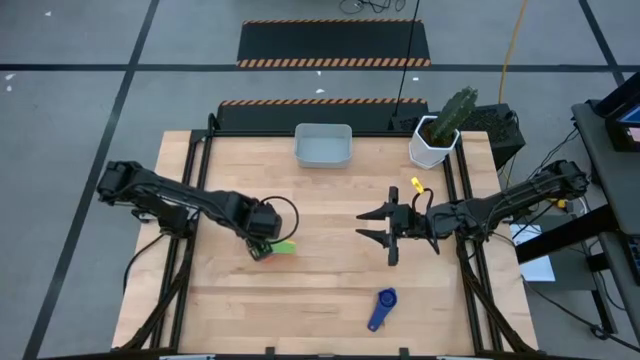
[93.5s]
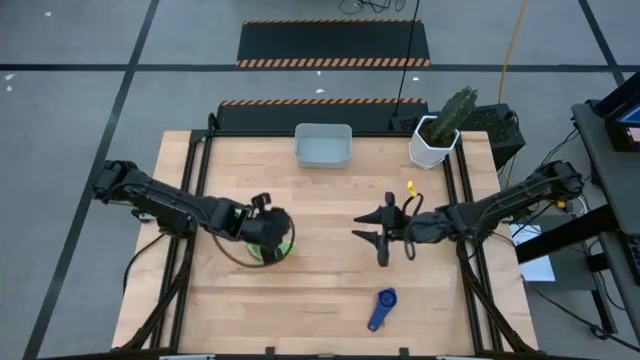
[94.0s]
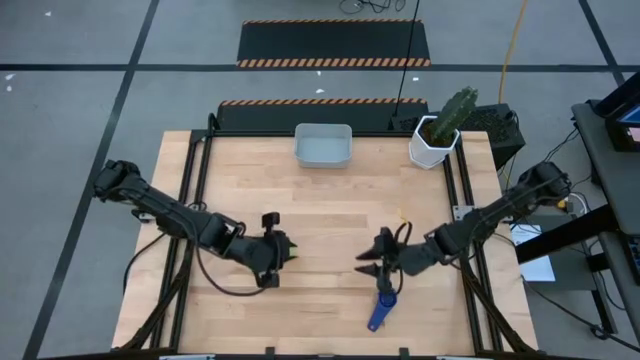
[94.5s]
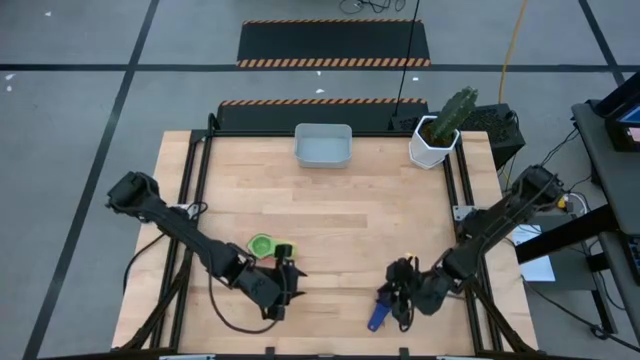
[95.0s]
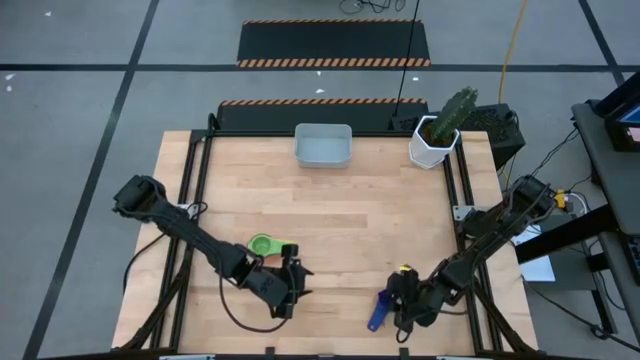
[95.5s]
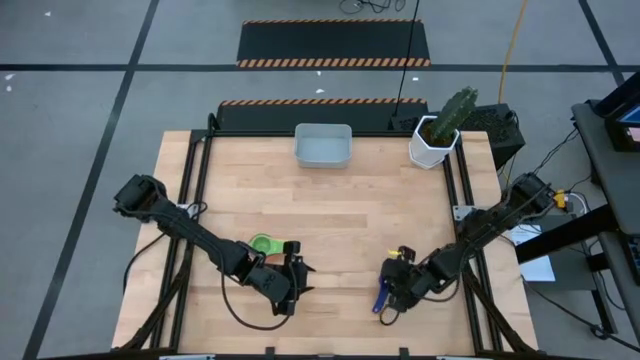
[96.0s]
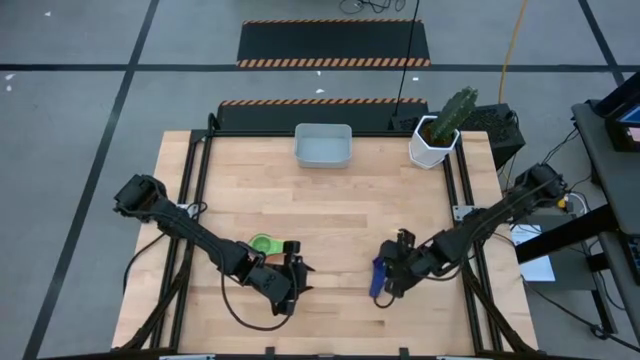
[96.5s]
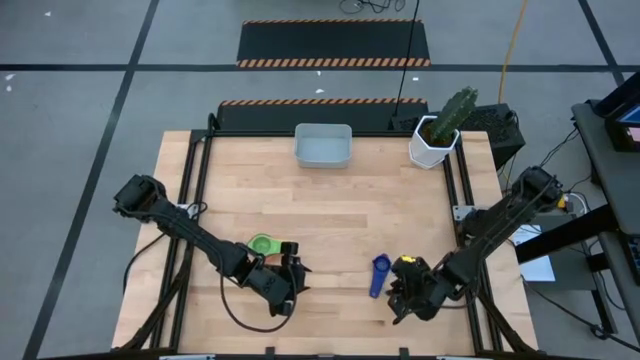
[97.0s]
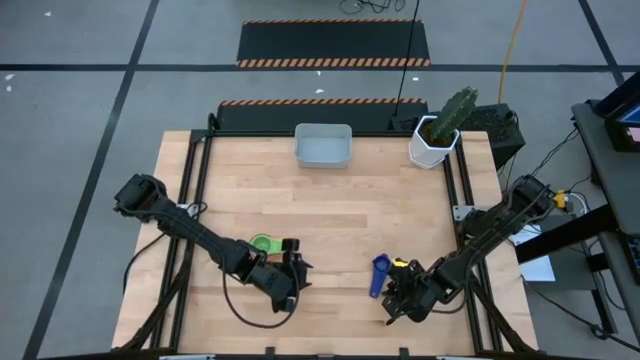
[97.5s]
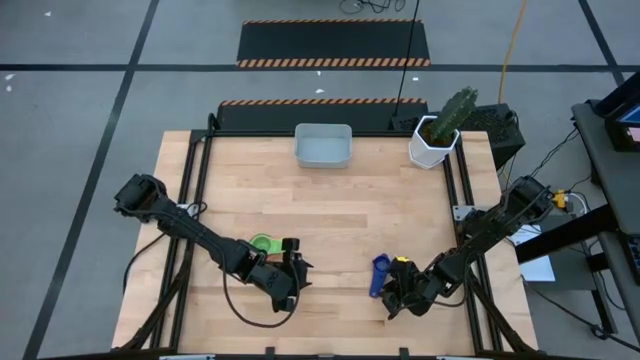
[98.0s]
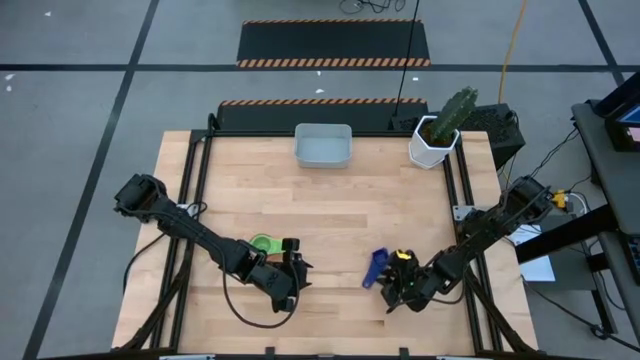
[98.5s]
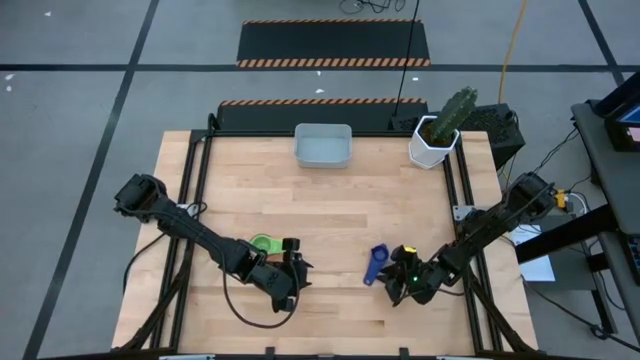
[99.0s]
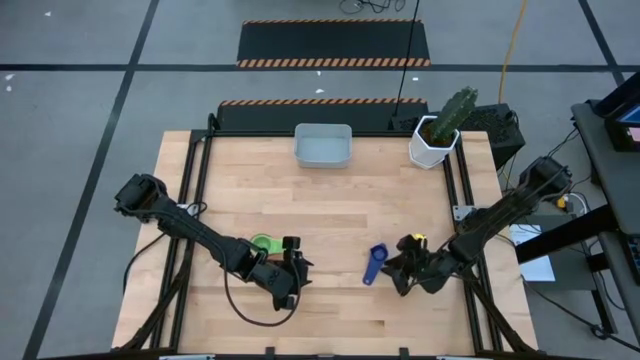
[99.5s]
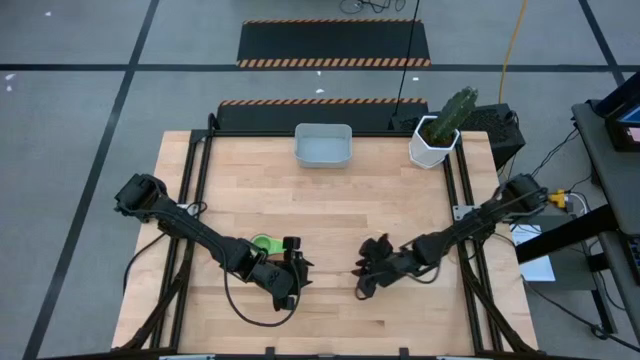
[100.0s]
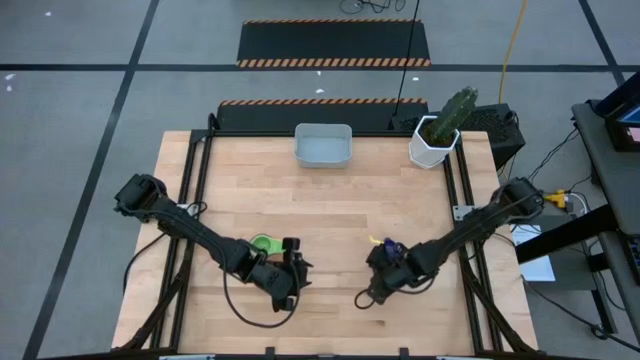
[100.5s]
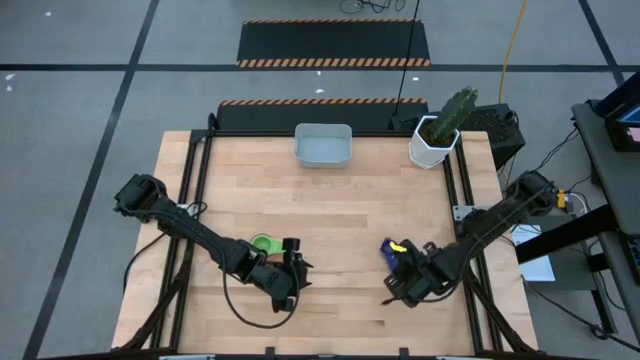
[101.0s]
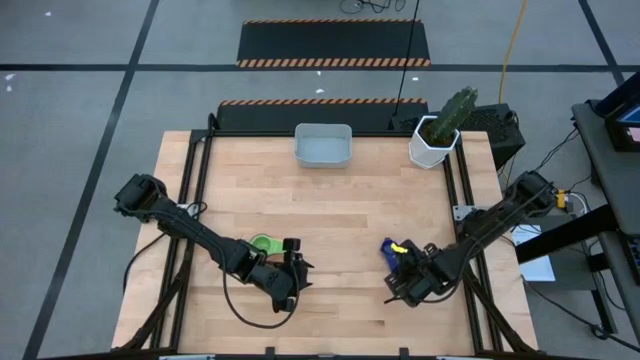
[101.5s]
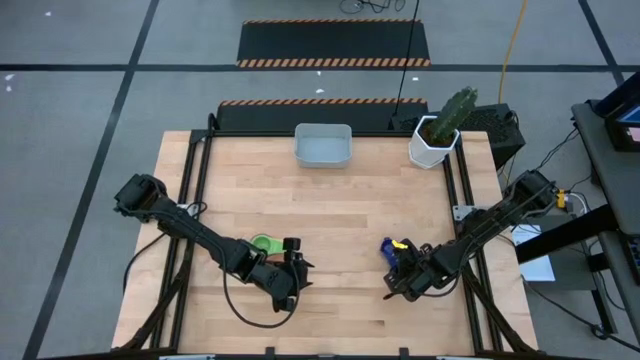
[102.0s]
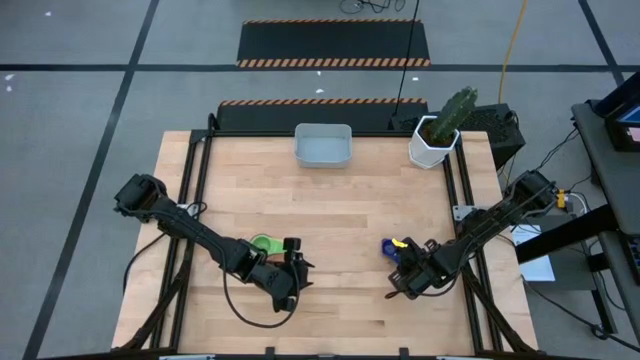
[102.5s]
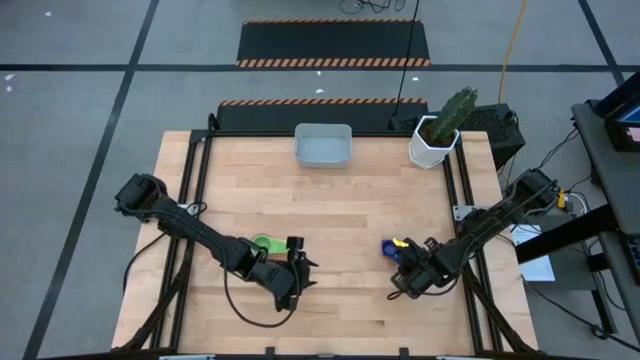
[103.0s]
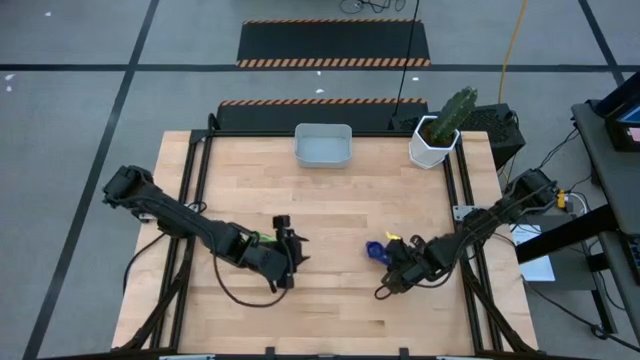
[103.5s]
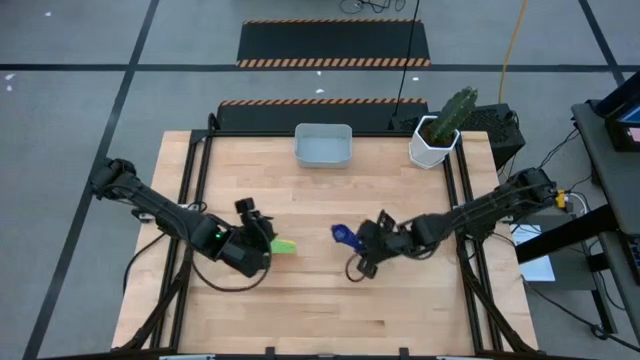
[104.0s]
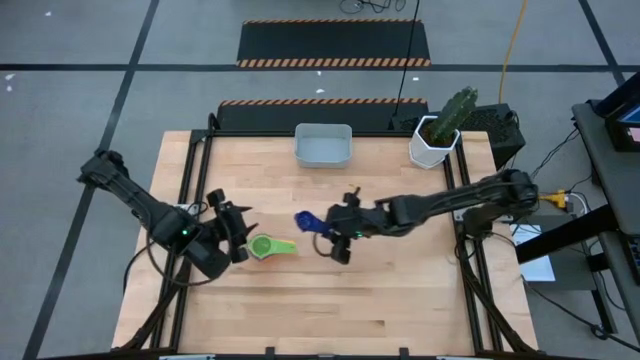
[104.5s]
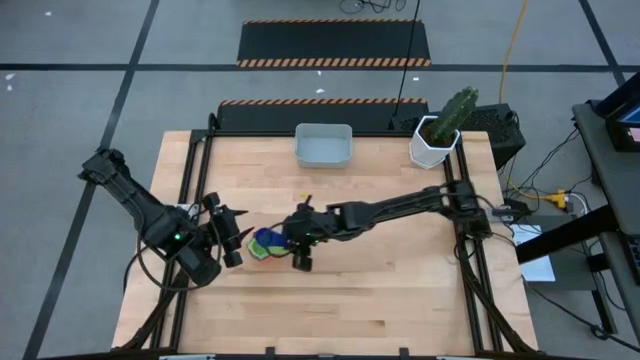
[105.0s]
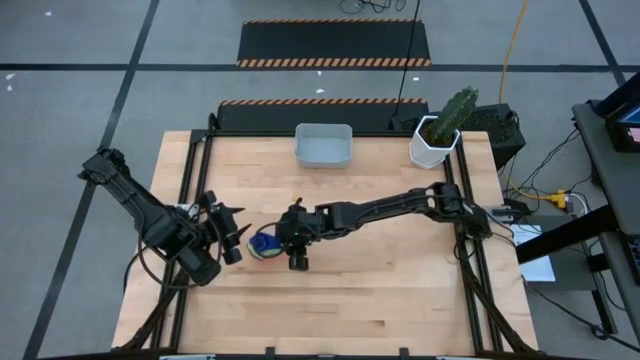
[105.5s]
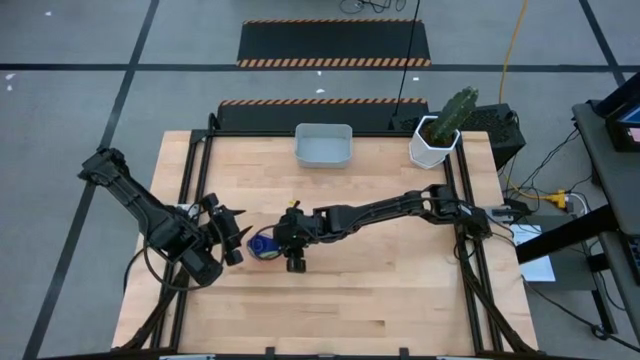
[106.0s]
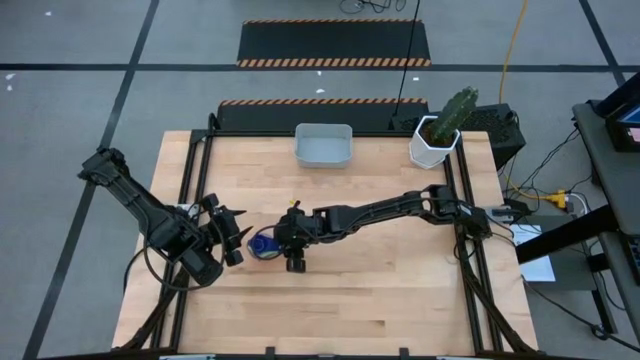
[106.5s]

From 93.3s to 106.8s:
Task: Nest measuring cups in basket
Stack the dark blue measuring cup into the green measuring cup

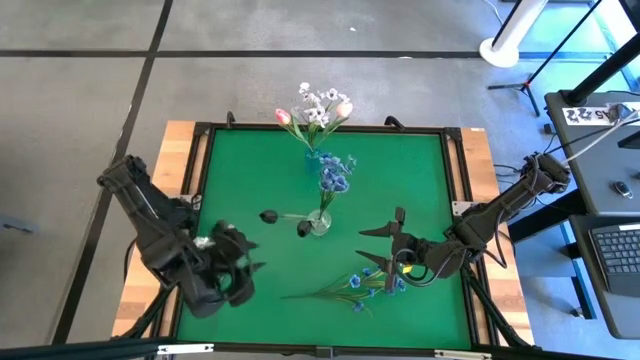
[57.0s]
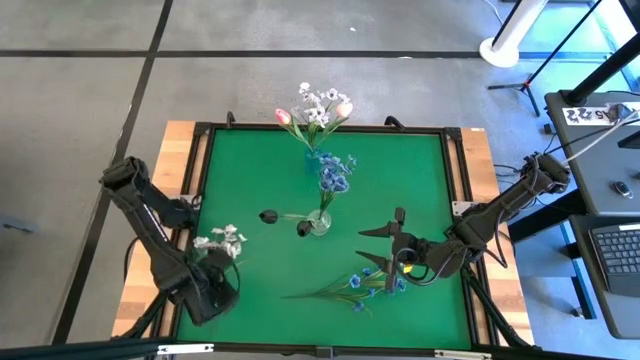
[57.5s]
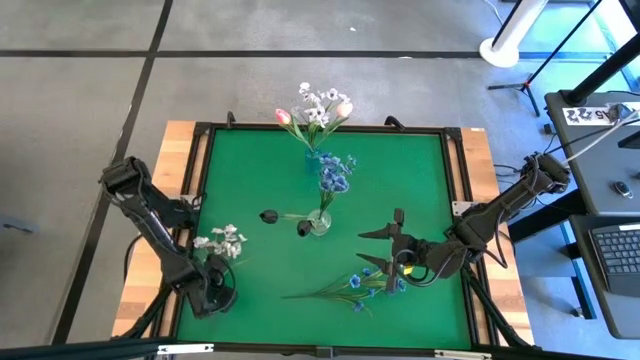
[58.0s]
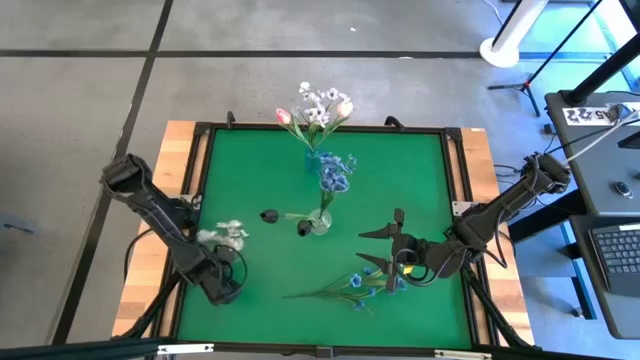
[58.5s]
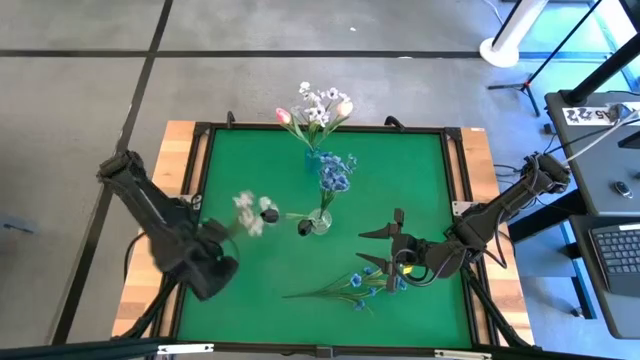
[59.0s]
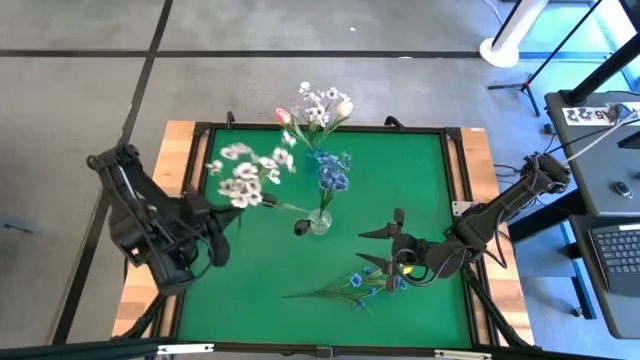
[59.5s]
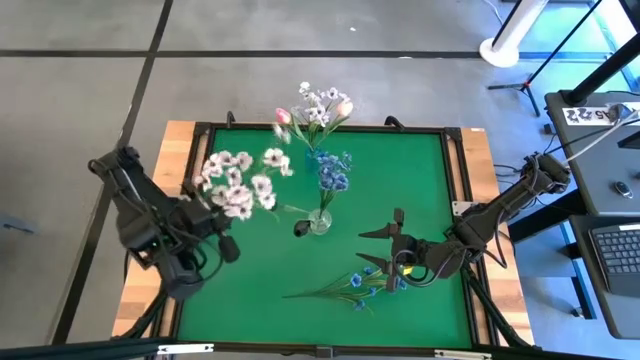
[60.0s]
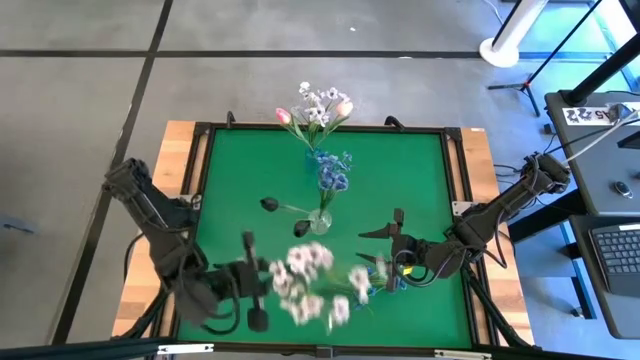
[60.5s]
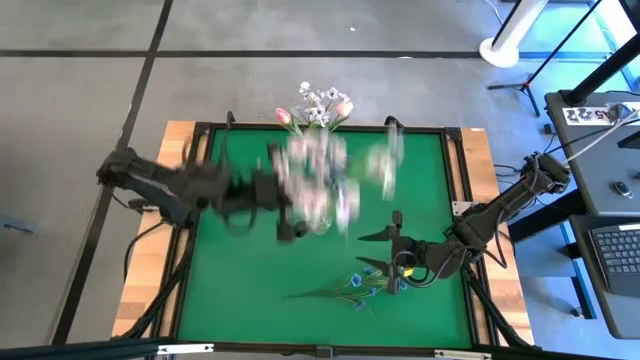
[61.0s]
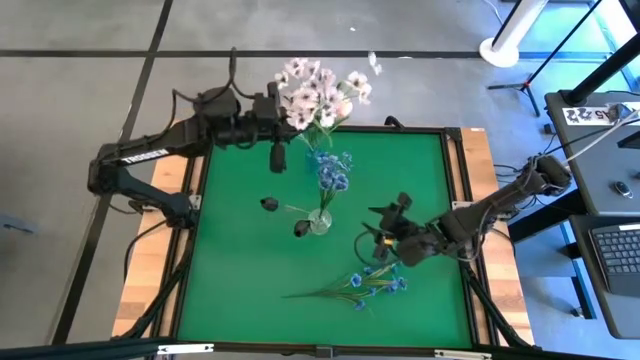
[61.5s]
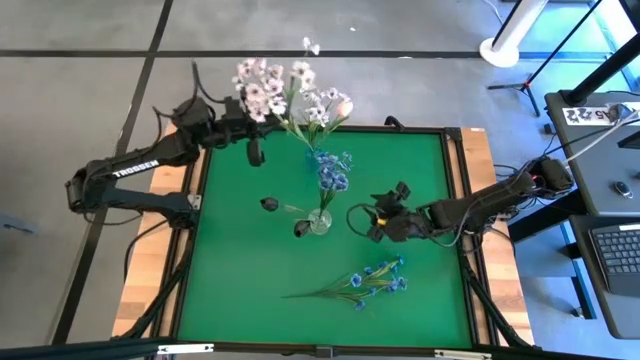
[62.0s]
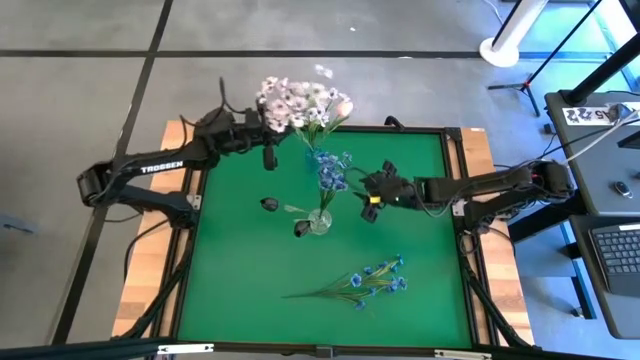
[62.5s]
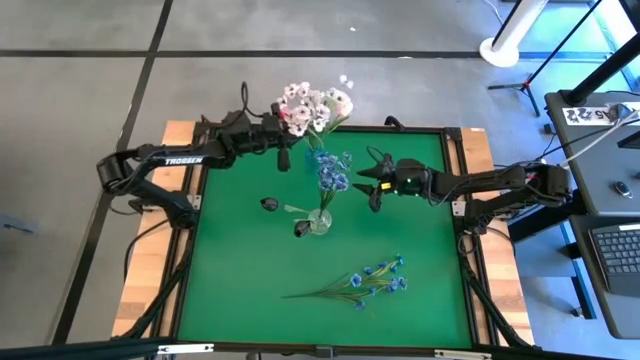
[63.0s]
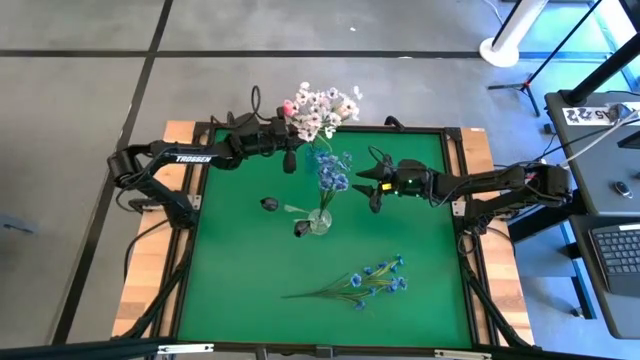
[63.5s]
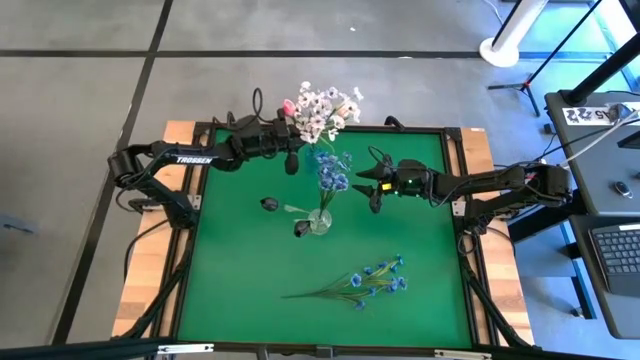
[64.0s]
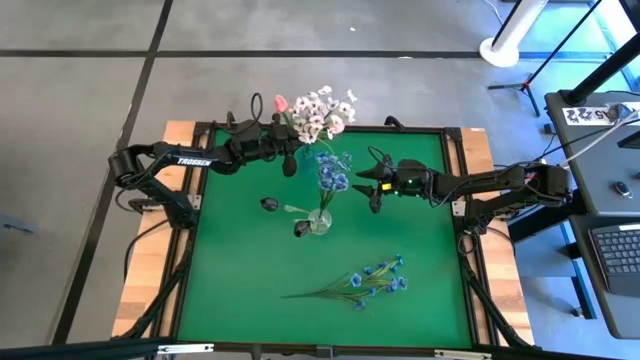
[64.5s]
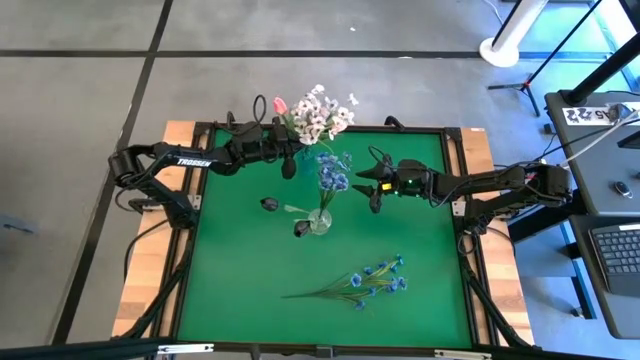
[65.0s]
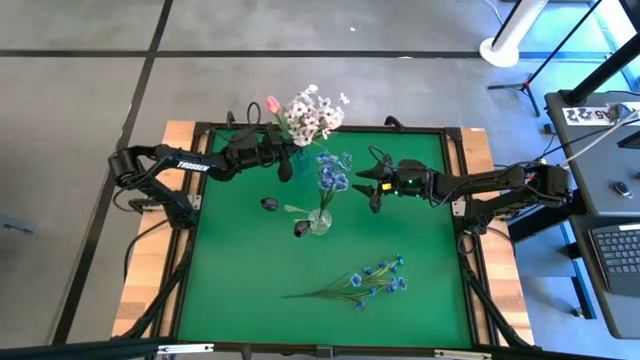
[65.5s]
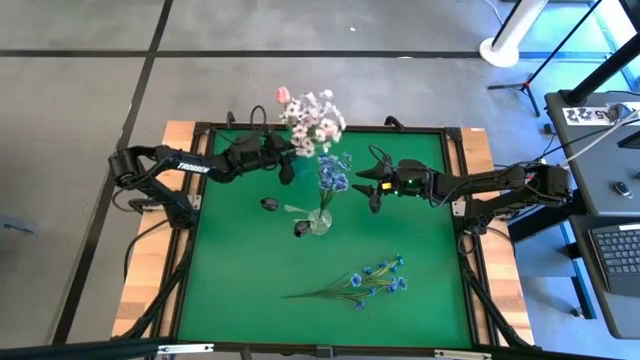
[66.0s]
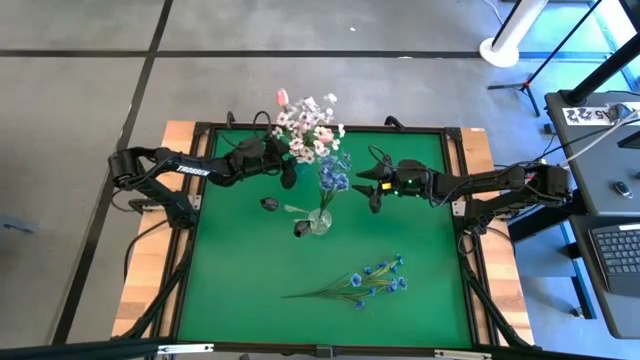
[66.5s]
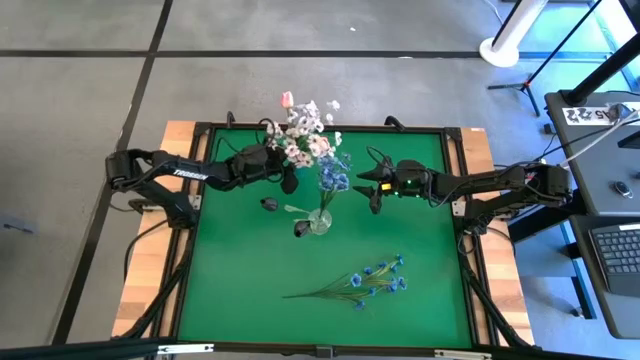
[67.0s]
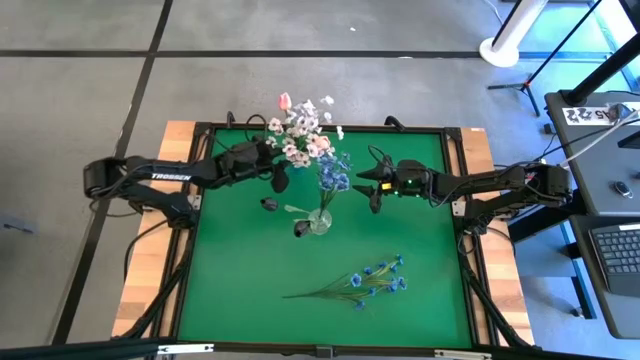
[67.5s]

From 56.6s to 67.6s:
Task: Sort flowers into vase by color
Put the white flowers into the blue vase
